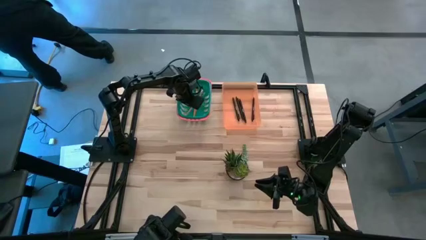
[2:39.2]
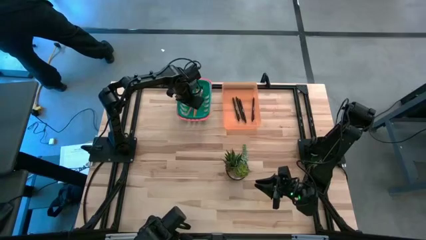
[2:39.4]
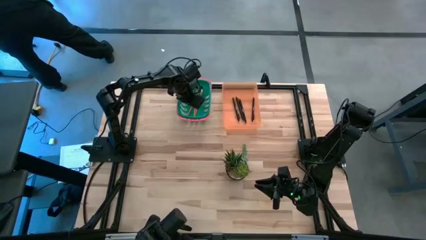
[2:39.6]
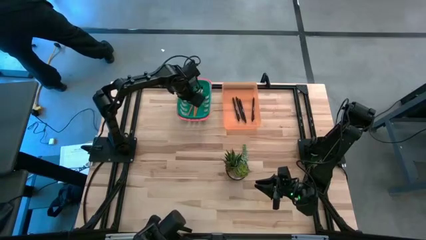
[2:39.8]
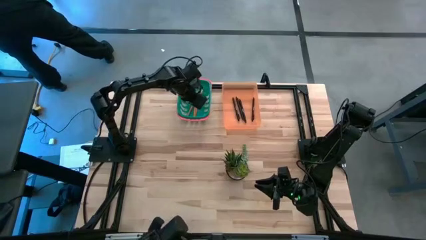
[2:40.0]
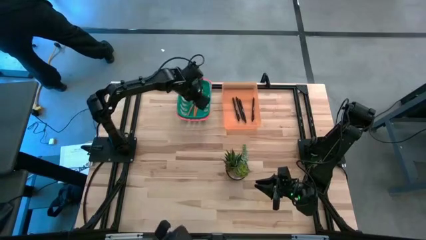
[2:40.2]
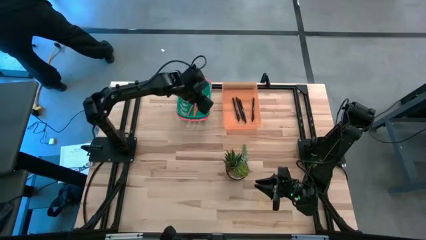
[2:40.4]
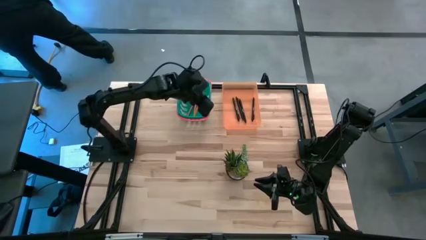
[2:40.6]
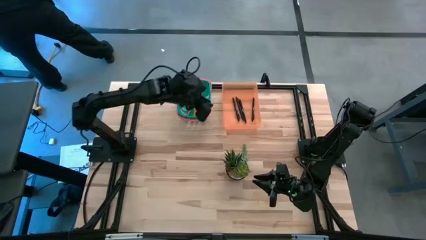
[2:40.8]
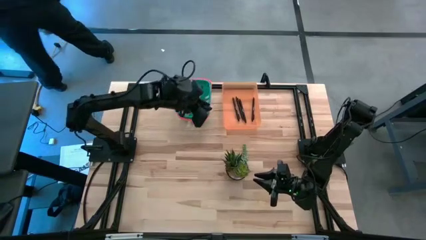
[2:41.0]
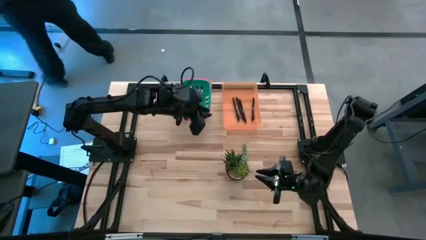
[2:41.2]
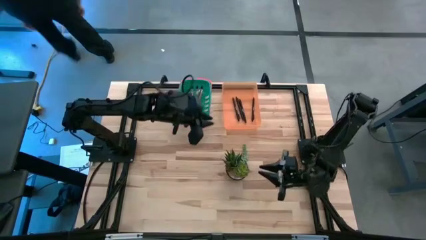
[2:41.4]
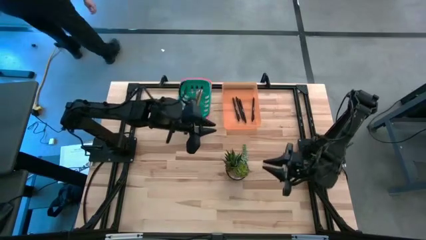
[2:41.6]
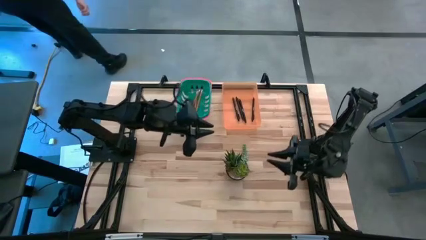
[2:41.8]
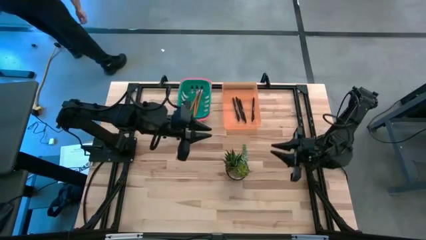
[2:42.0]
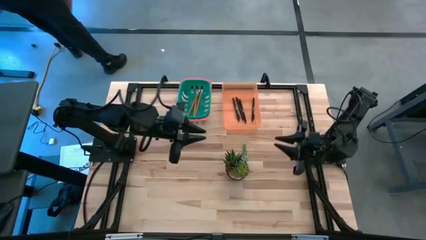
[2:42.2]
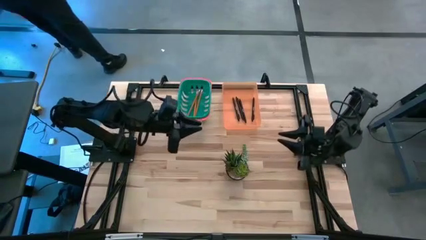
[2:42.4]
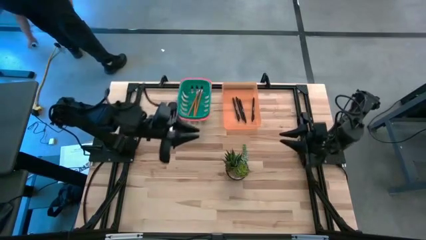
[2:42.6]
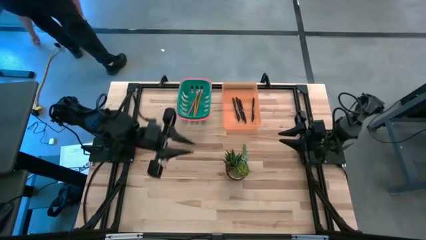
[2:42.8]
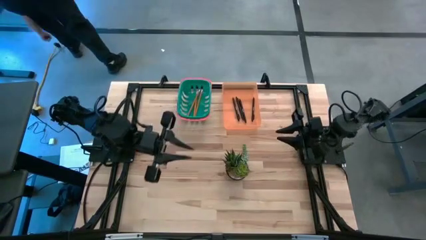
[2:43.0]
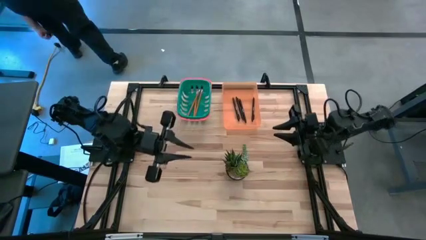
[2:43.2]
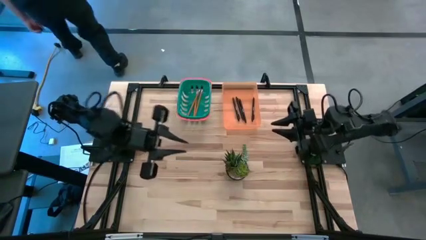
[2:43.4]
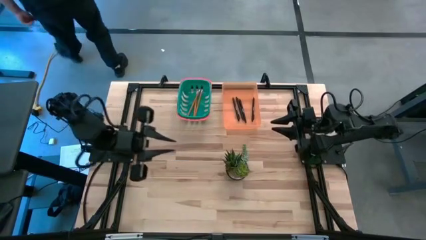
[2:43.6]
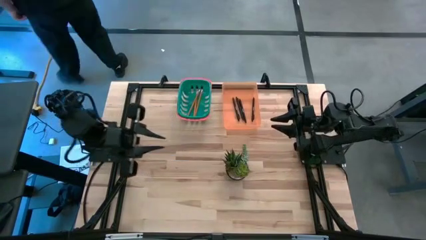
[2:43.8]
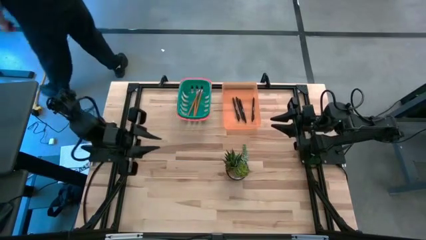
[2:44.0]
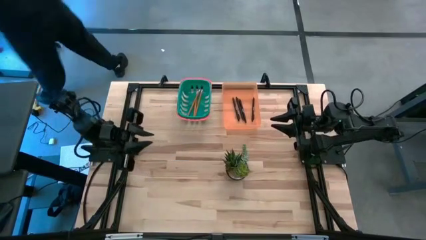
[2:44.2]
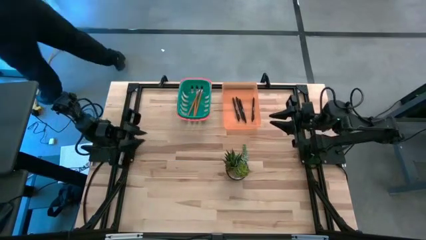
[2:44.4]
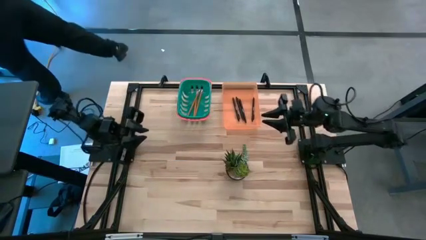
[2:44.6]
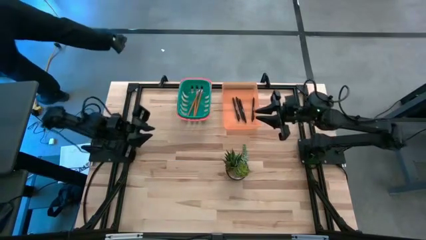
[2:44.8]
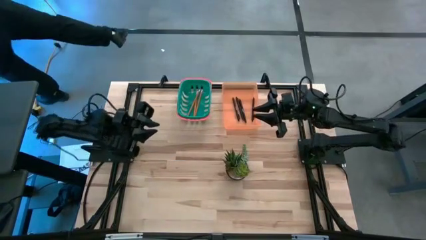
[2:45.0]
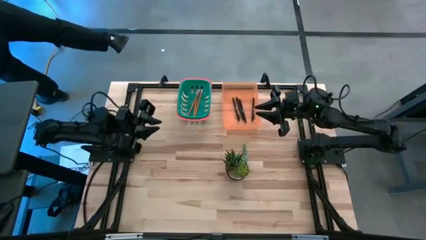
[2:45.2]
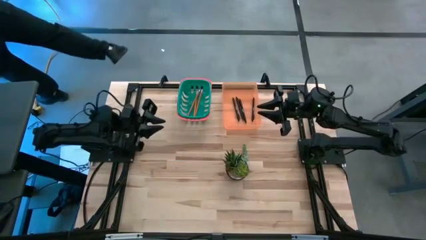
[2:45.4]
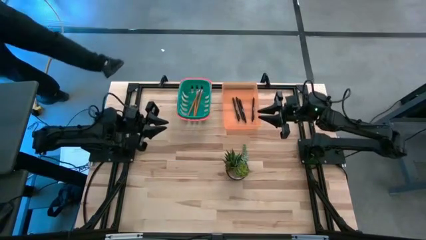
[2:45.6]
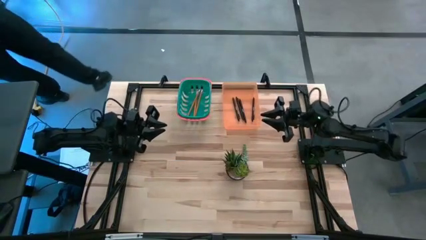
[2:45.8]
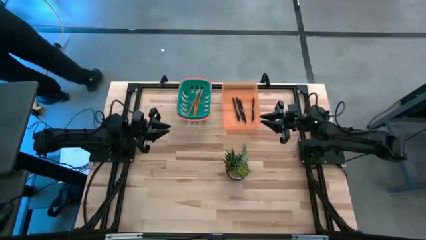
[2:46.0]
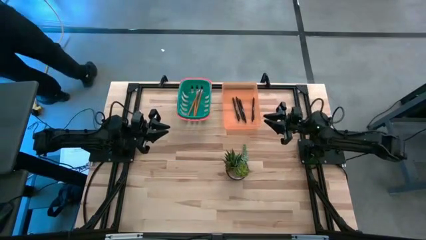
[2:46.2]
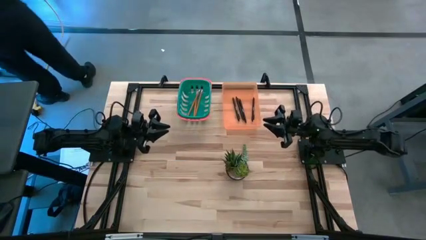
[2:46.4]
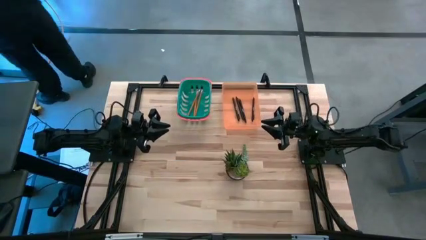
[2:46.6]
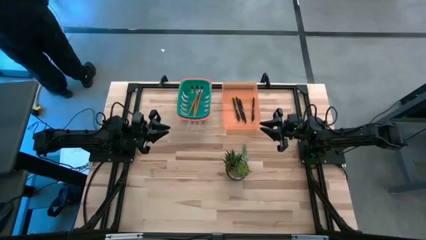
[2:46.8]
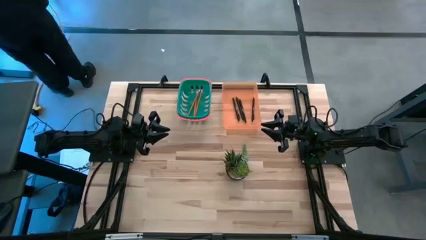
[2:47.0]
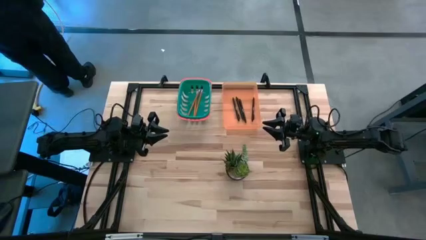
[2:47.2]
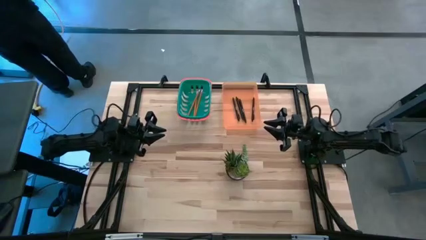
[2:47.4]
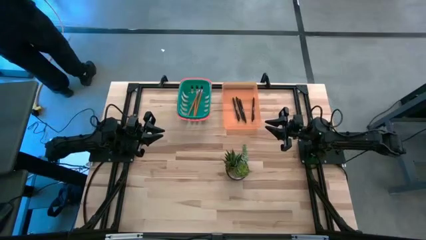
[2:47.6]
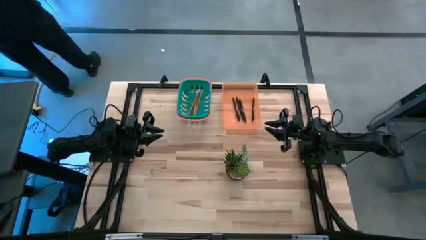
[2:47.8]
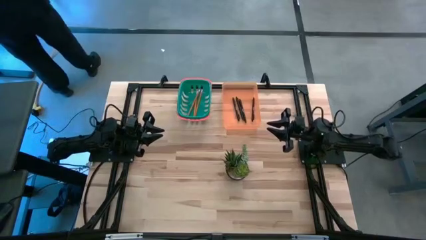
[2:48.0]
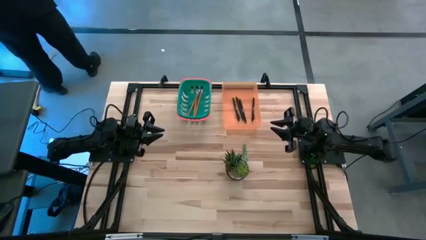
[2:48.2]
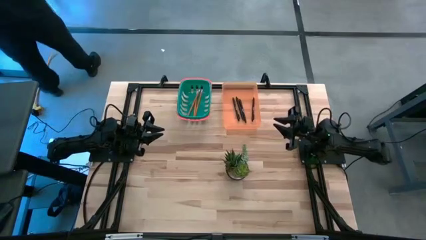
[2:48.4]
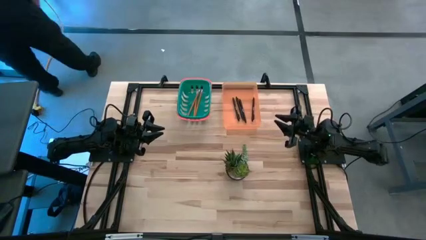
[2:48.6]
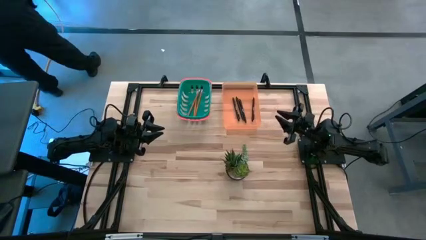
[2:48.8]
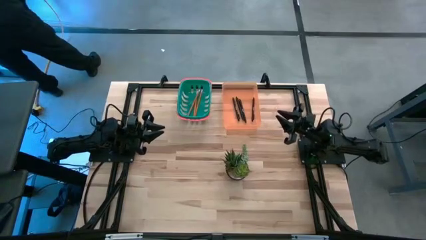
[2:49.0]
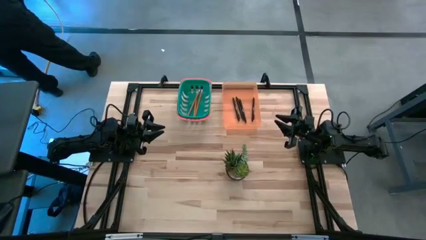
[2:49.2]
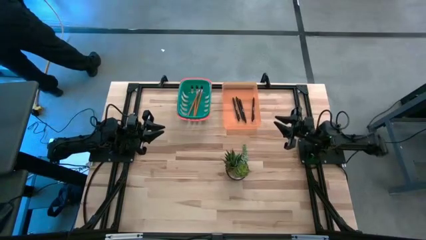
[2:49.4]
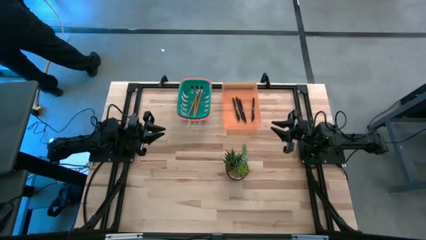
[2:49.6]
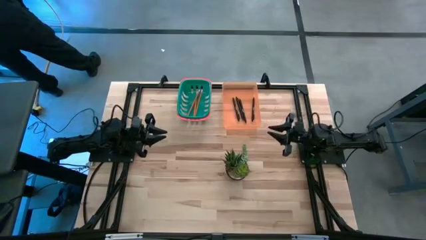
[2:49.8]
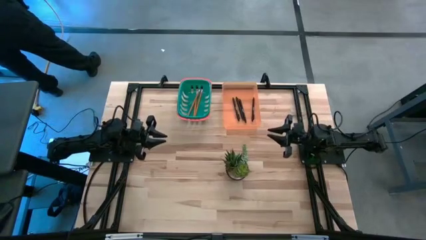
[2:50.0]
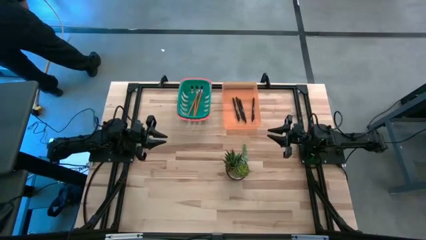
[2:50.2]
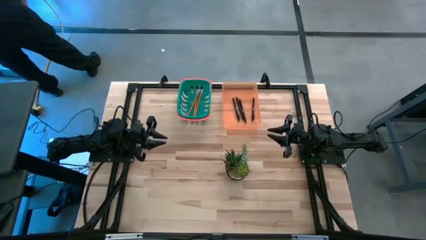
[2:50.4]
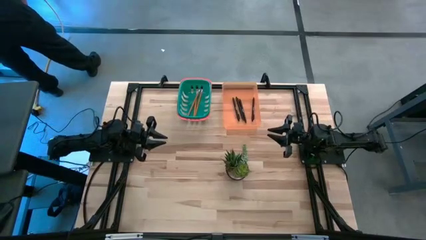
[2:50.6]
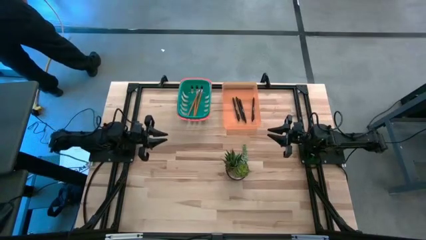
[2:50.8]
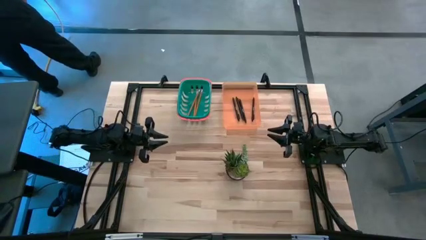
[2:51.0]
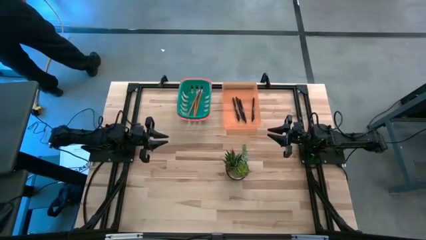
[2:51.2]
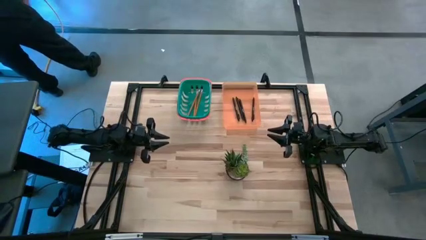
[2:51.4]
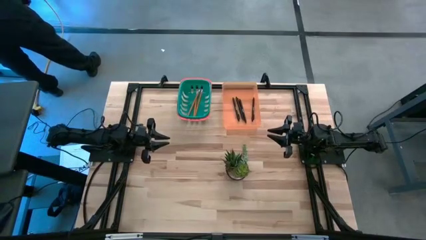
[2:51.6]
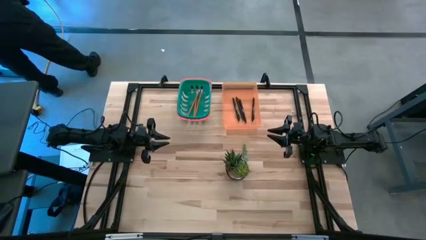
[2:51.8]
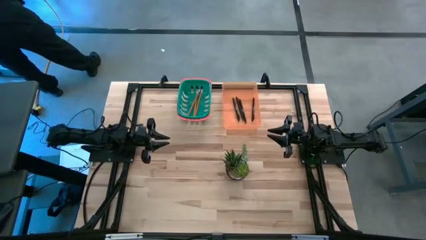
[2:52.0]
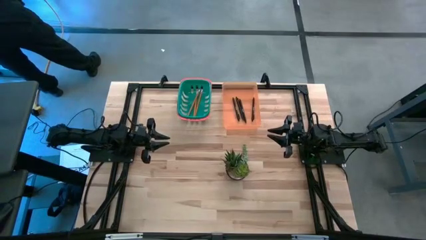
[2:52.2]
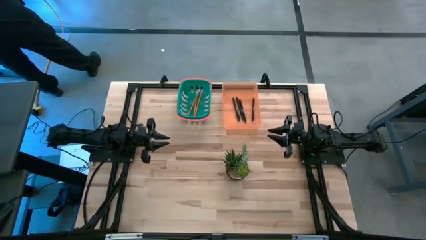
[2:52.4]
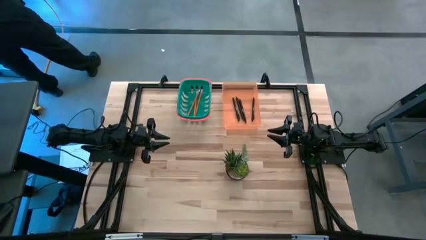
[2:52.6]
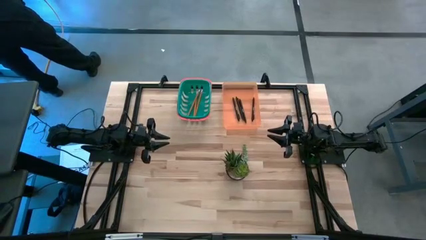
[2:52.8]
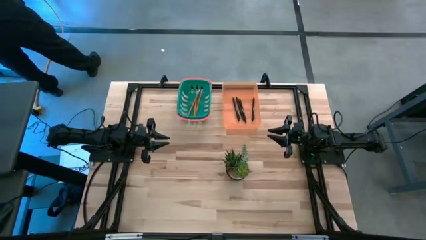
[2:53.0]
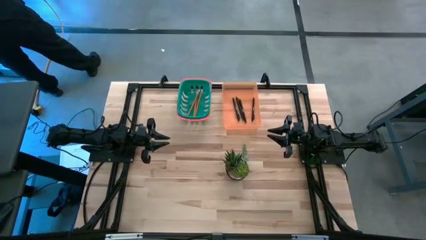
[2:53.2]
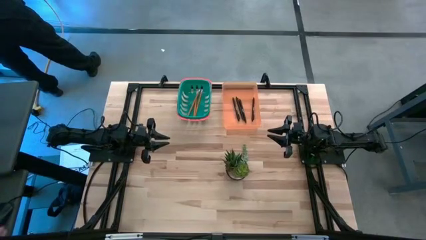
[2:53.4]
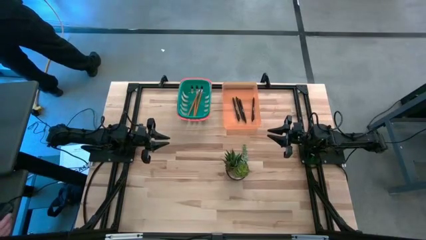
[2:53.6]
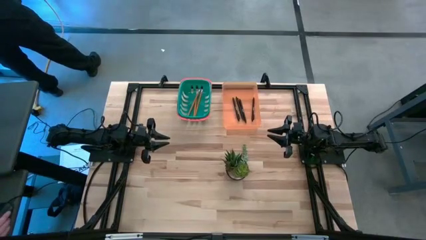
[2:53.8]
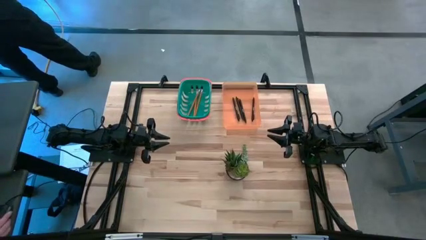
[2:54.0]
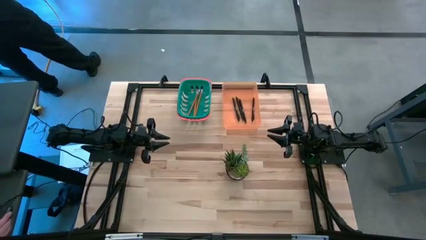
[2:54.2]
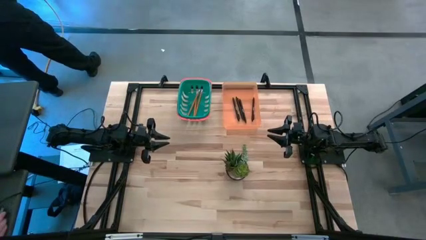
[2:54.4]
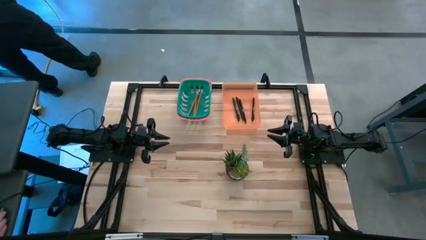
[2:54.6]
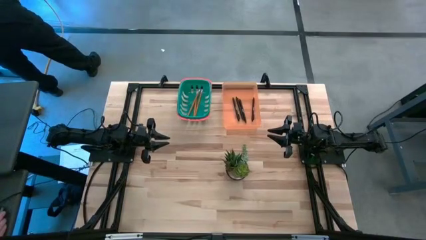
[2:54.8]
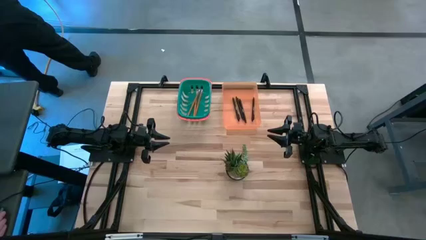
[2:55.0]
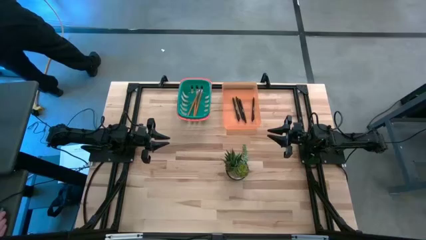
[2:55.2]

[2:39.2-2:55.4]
Task: Sort pens & pencils
Return to Home Position
